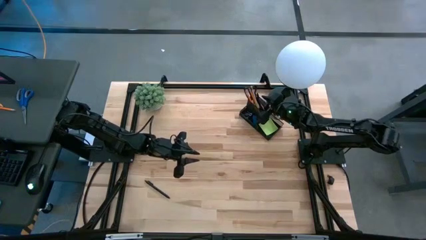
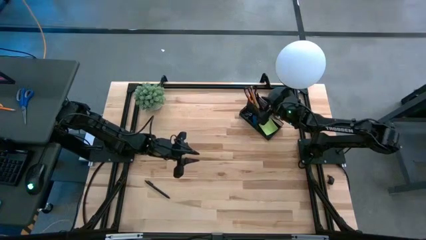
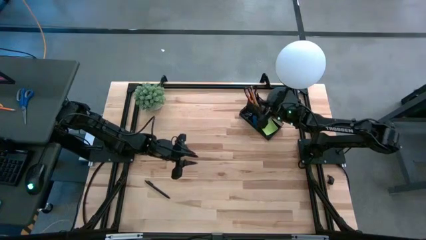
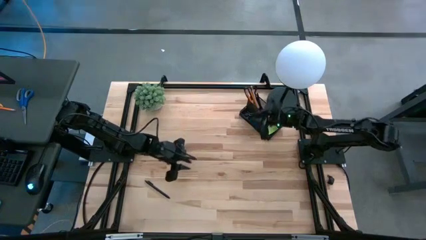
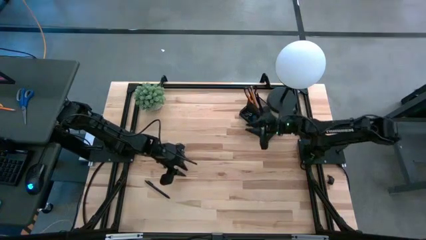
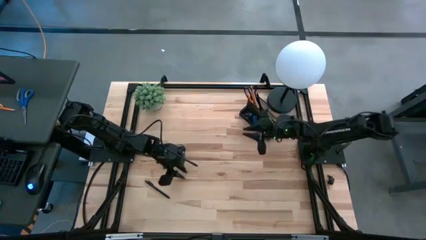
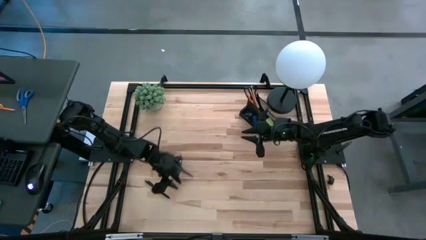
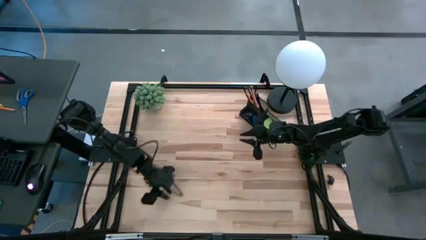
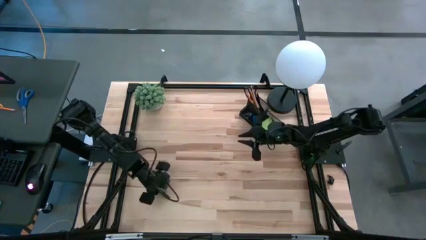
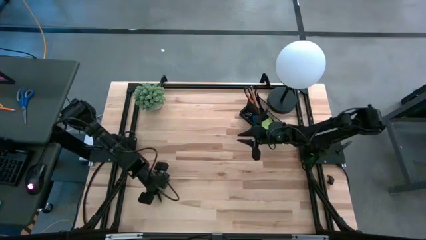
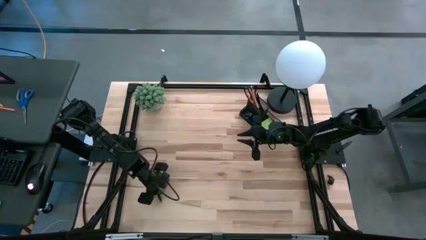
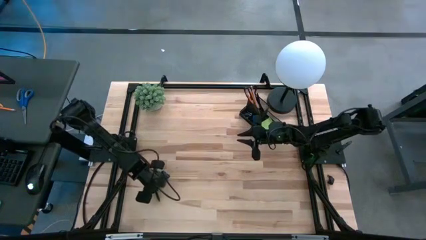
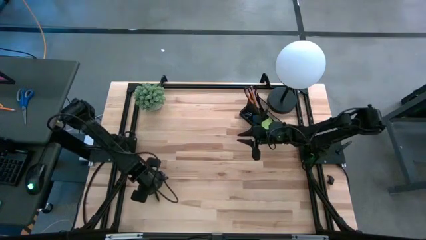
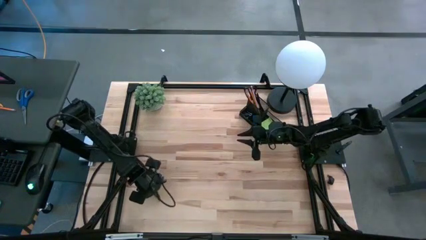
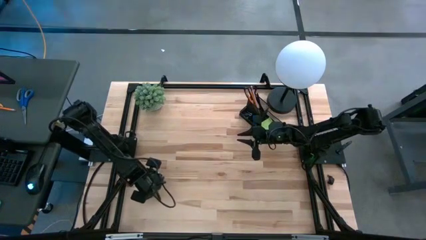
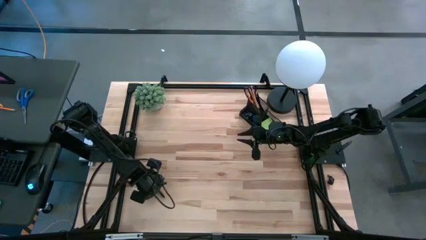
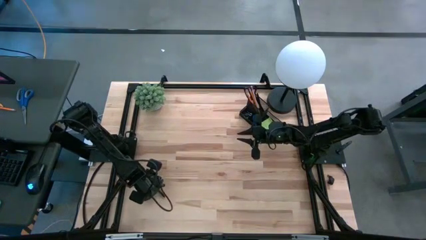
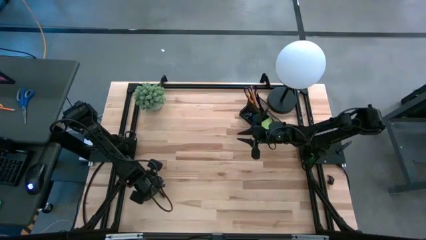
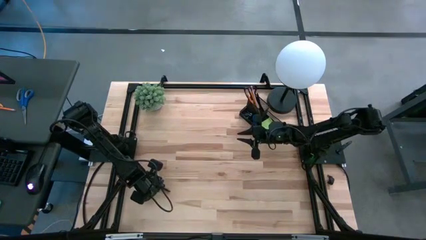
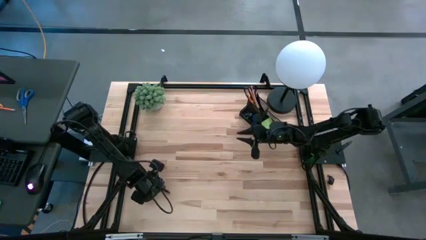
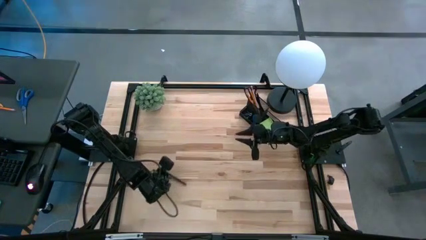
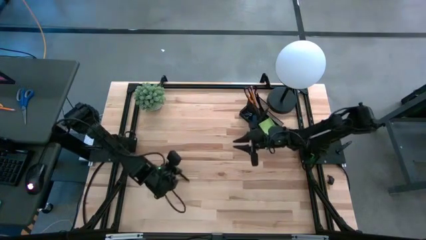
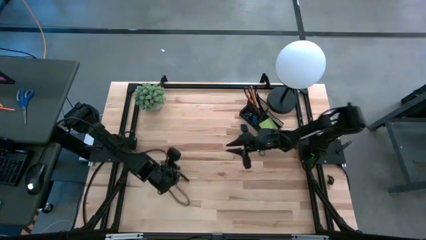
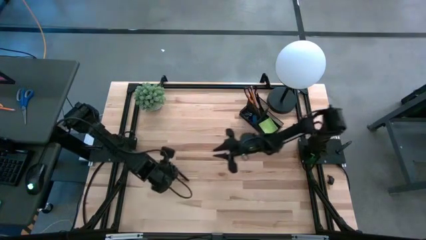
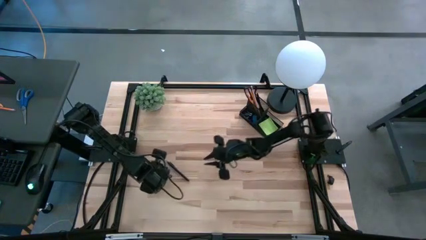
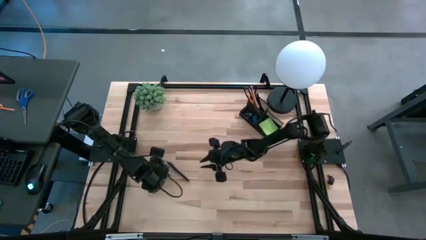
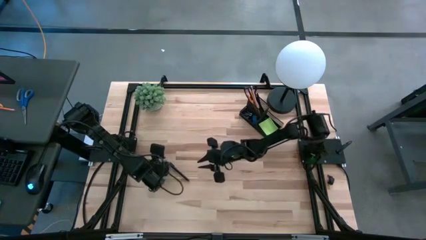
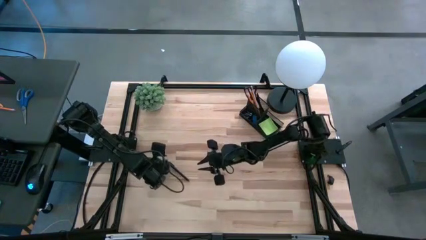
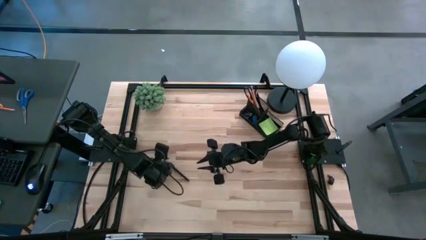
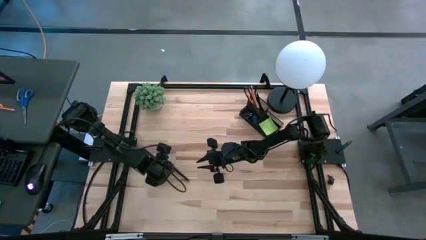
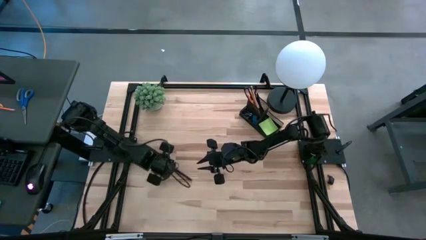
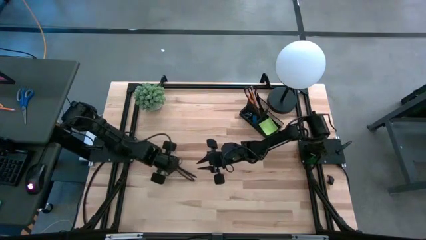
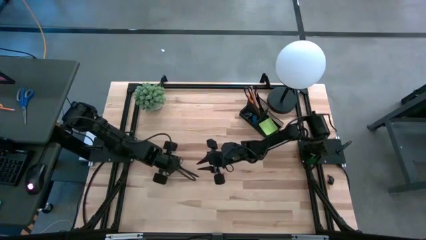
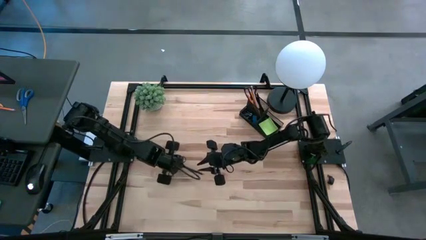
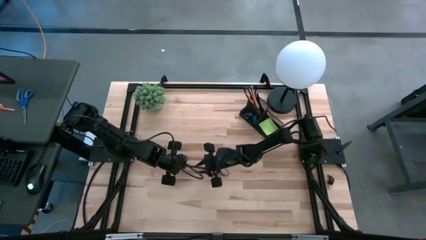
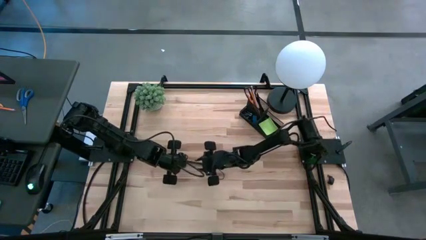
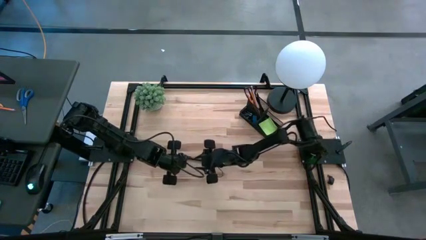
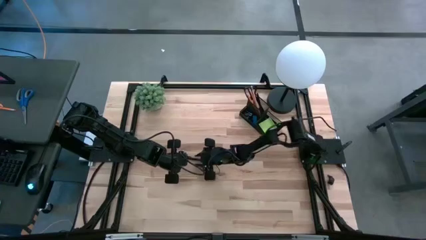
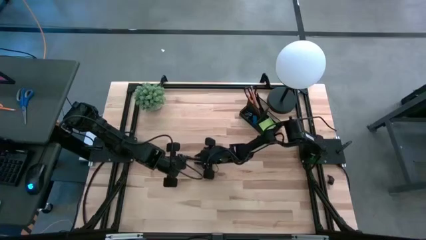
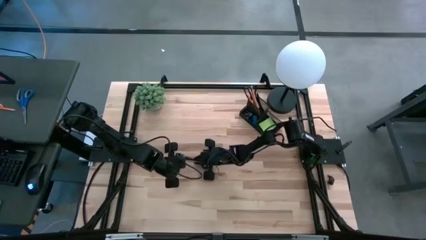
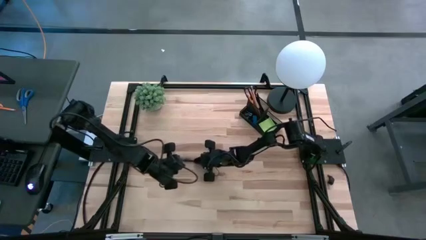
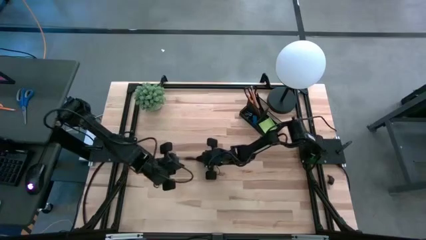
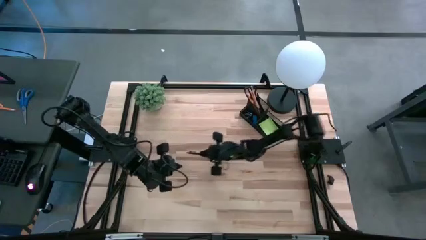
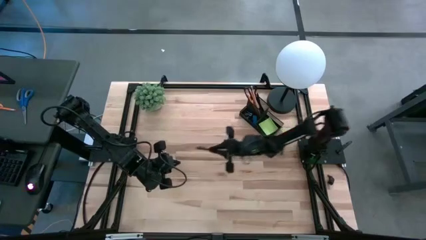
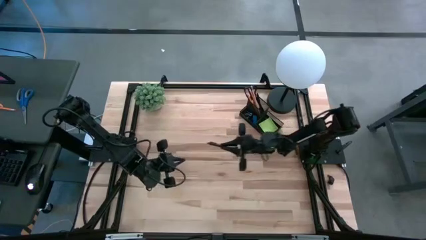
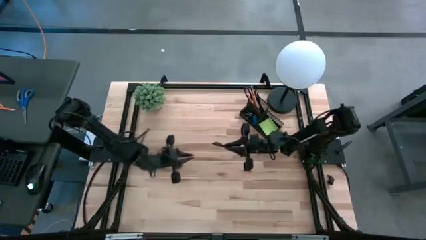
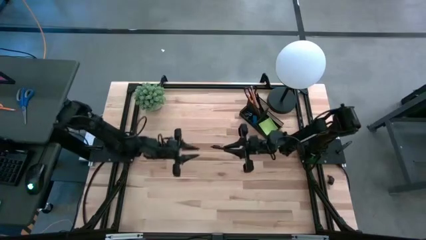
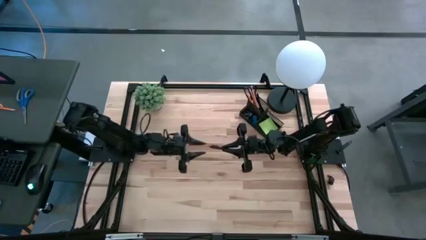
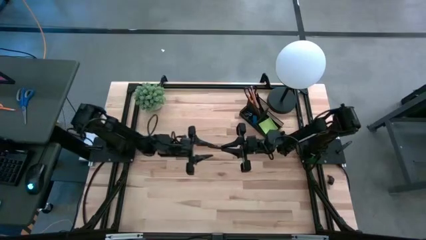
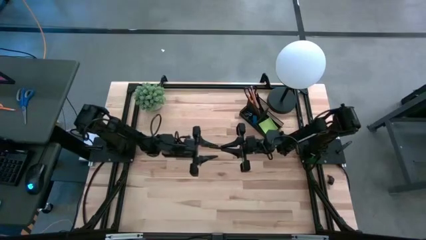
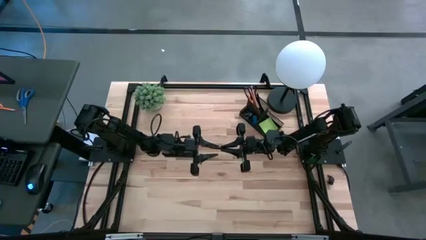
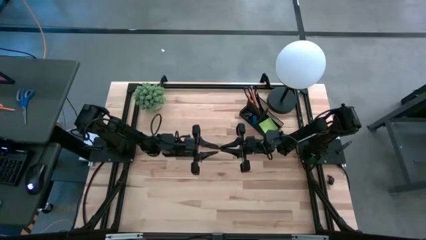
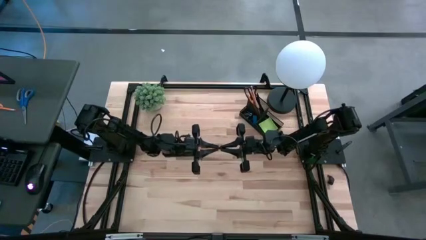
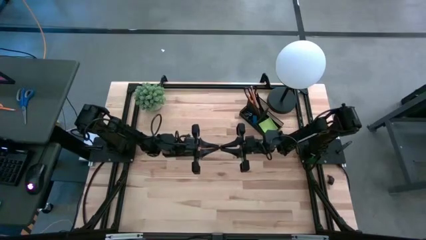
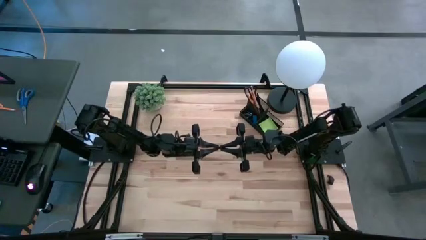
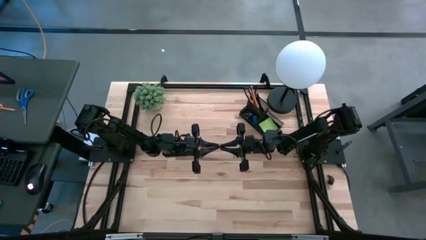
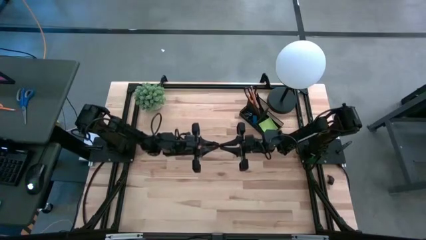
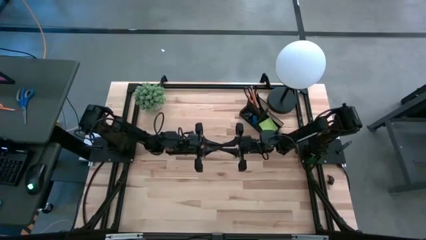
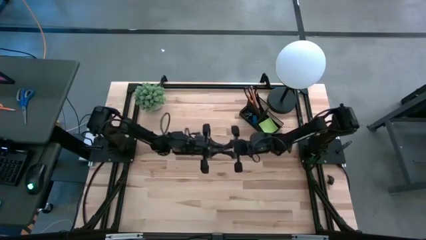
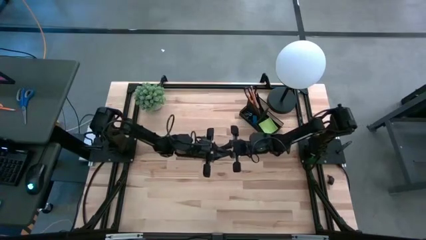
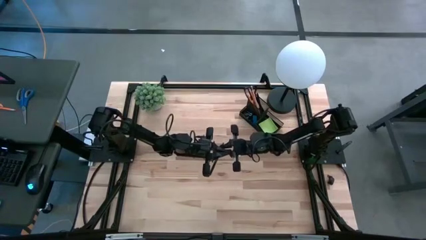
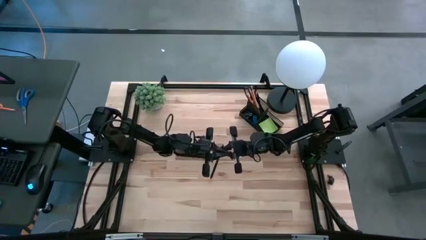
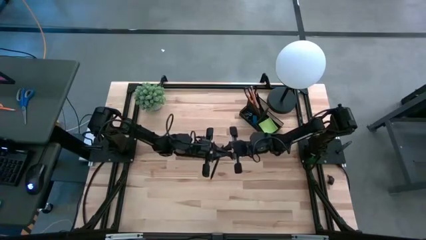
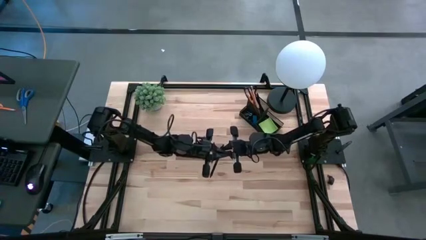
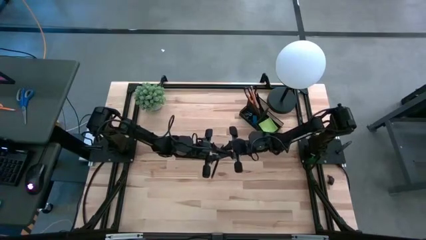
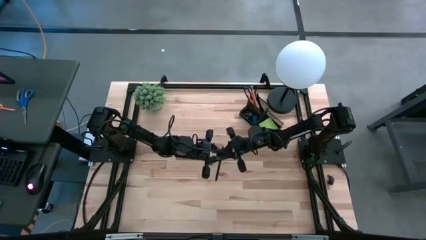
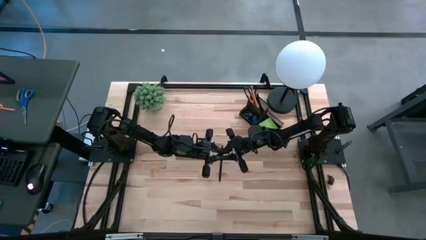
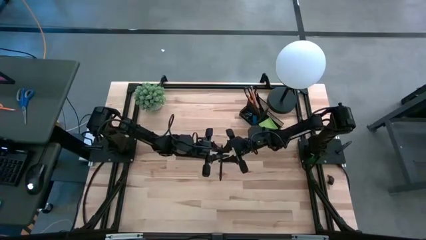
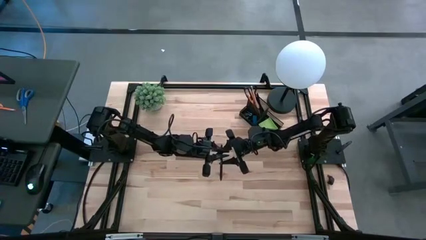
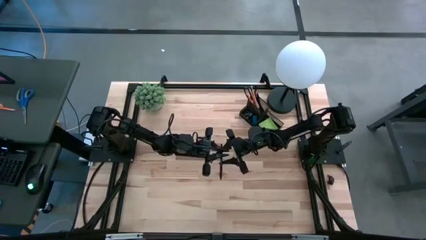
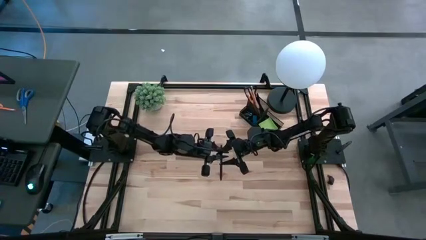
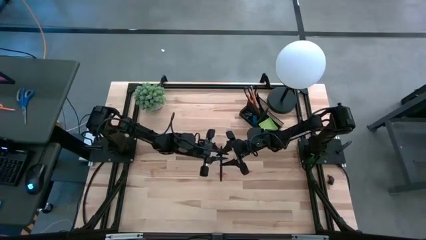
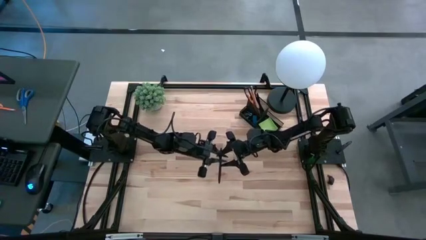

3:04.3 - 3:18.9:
Task: Pick and place office supplies into organizer
Put the black pen into the black desk organizer

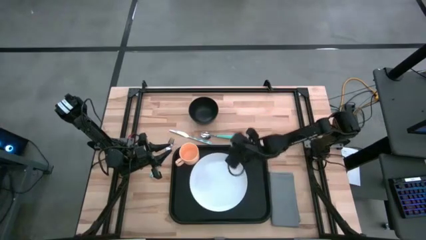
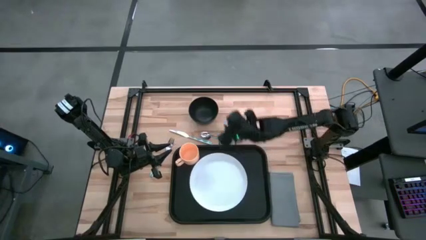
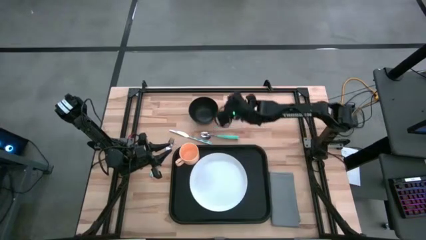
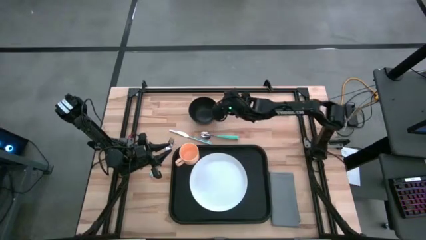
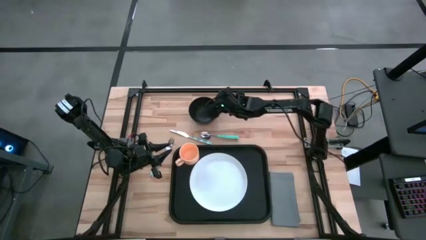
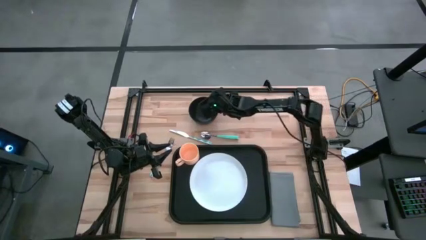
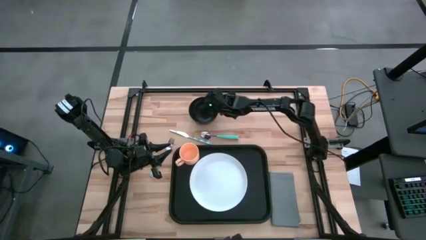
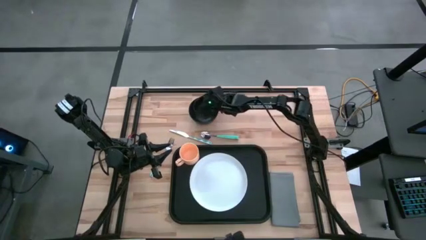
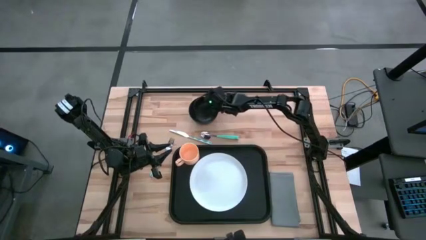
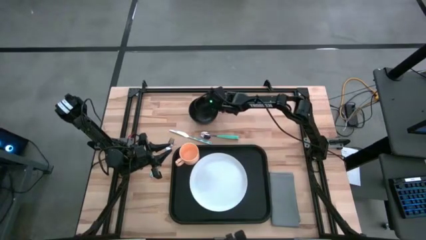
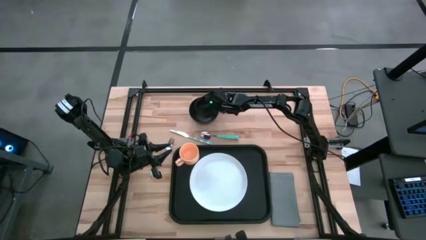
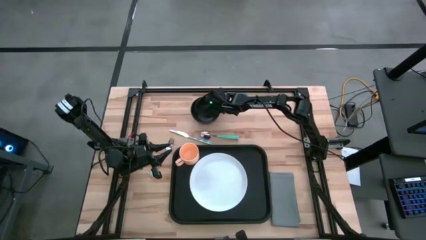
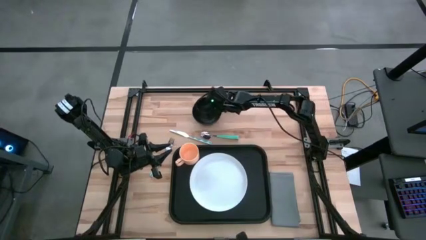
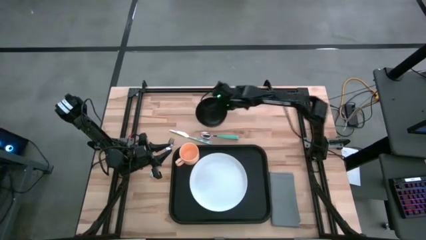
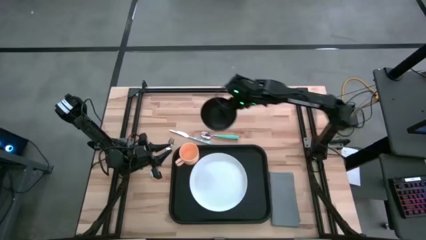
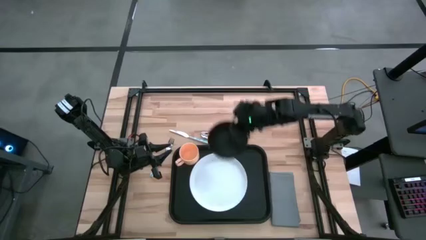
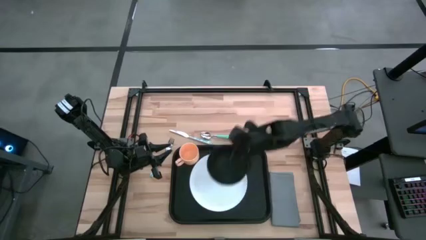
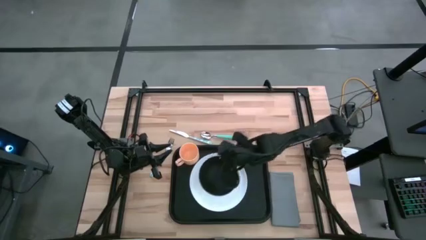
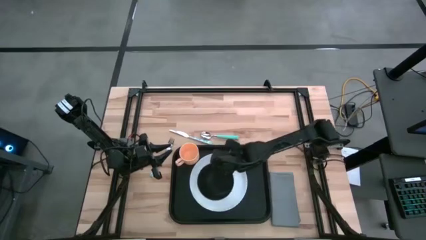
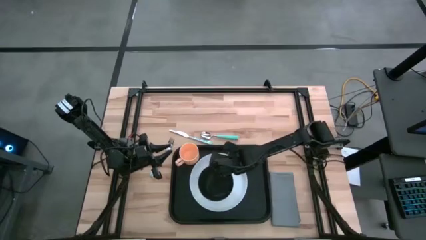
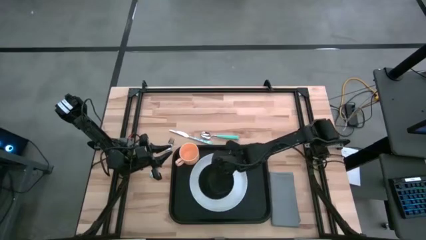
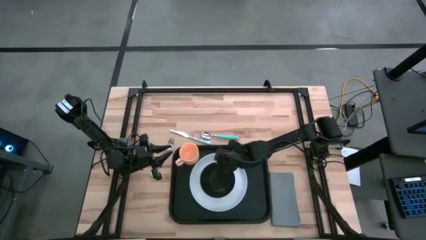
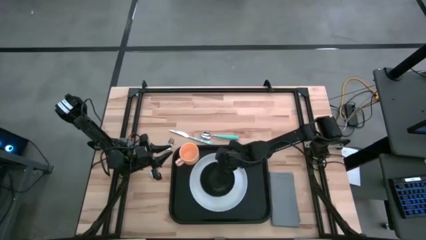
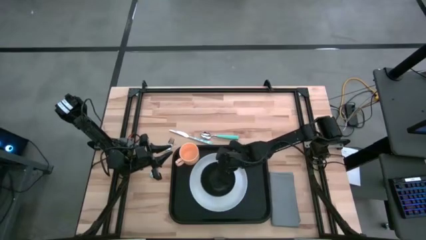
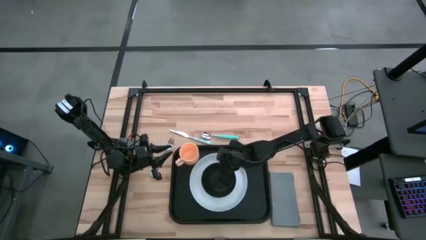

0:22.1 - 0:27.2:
Task: Set up tray
Put the black bowl on top of the white plate on the black tray
